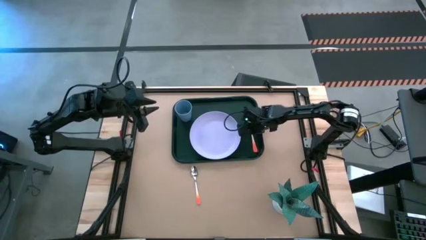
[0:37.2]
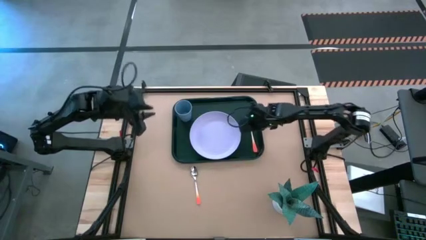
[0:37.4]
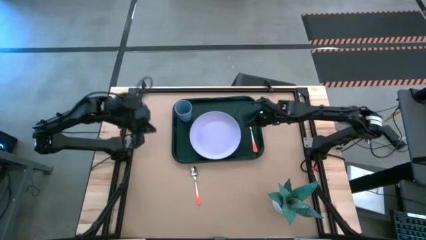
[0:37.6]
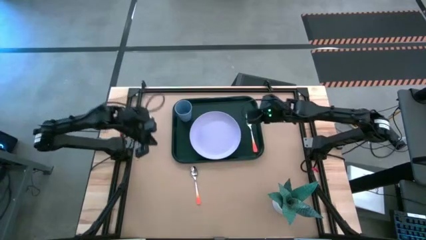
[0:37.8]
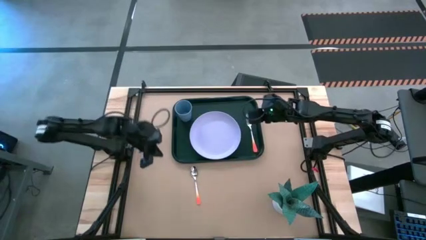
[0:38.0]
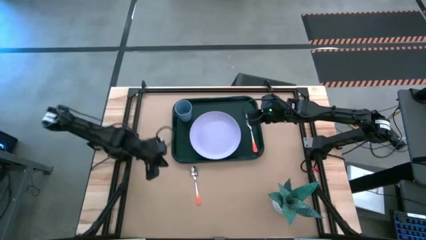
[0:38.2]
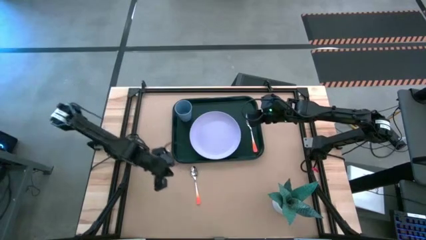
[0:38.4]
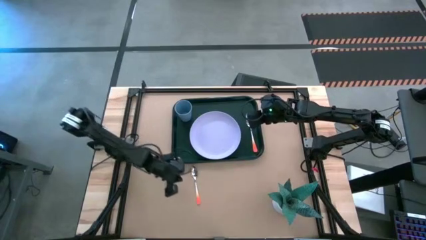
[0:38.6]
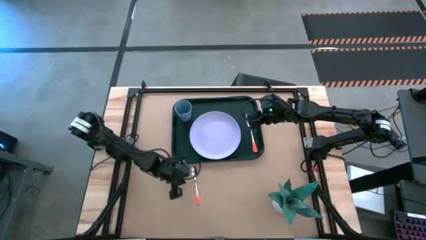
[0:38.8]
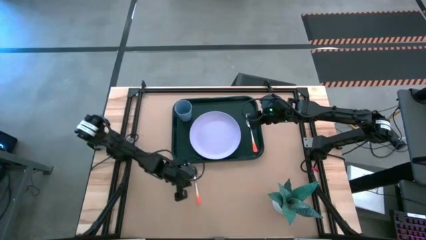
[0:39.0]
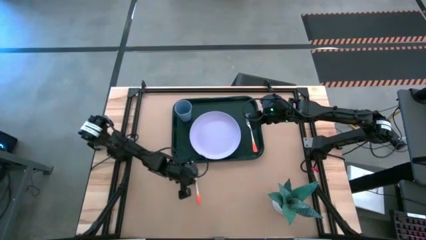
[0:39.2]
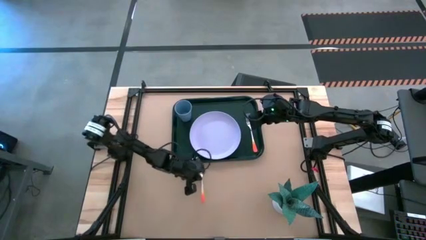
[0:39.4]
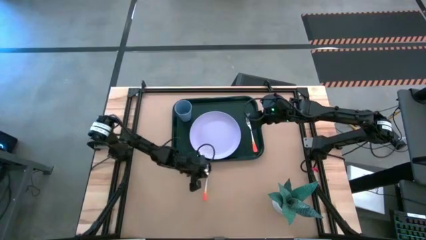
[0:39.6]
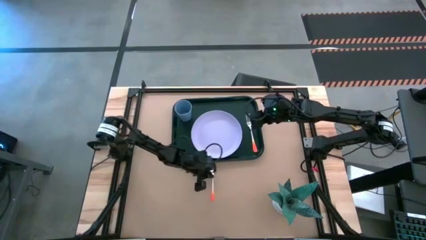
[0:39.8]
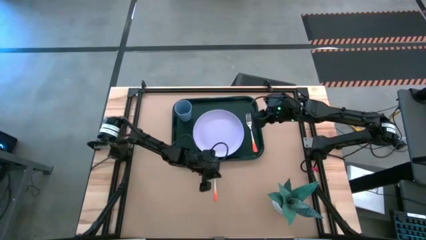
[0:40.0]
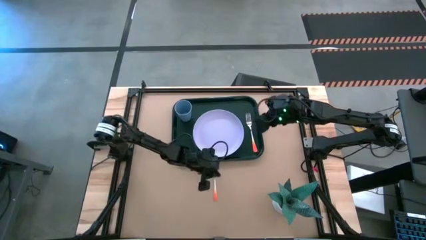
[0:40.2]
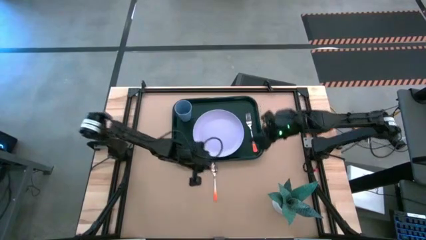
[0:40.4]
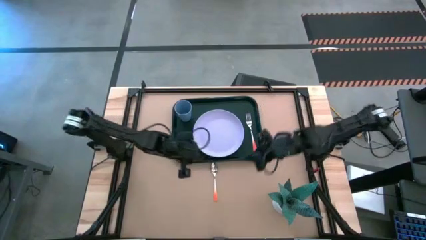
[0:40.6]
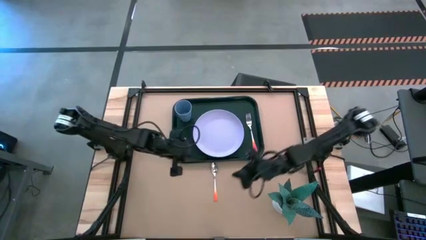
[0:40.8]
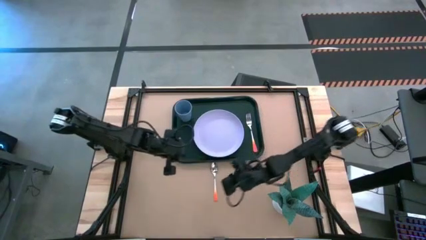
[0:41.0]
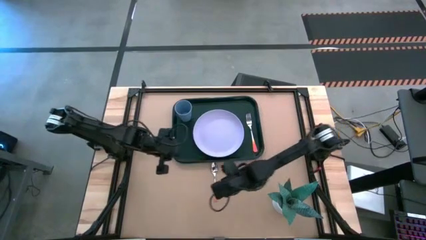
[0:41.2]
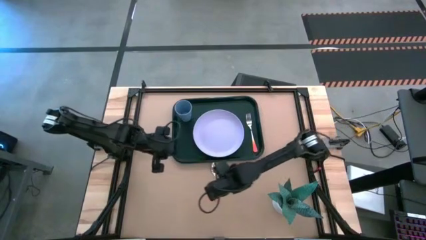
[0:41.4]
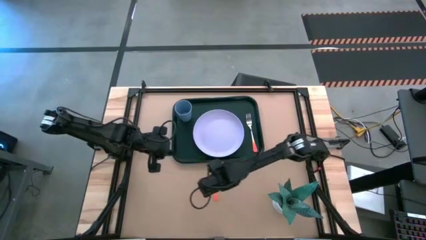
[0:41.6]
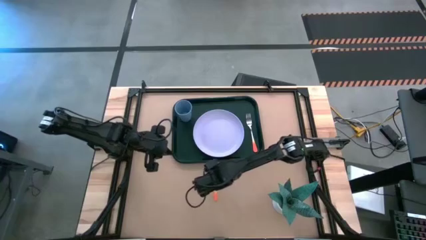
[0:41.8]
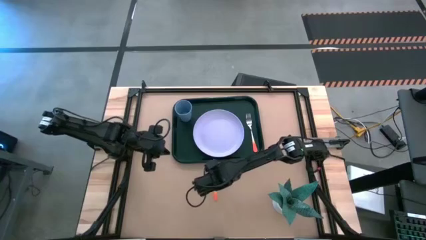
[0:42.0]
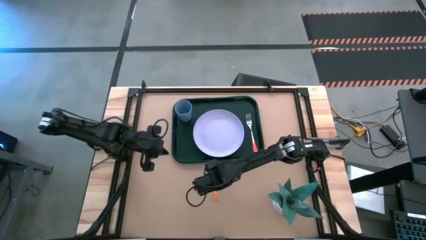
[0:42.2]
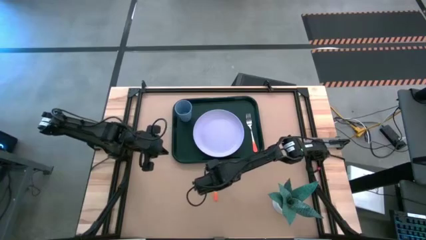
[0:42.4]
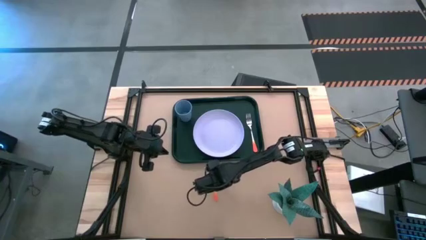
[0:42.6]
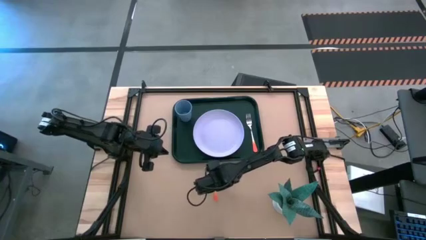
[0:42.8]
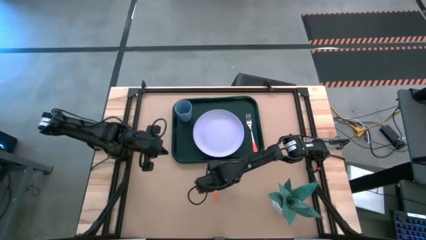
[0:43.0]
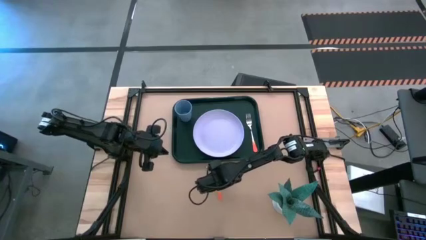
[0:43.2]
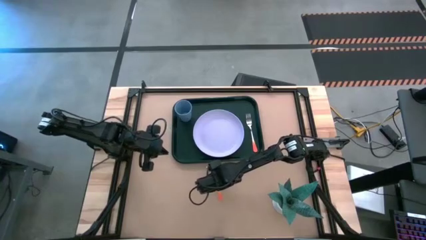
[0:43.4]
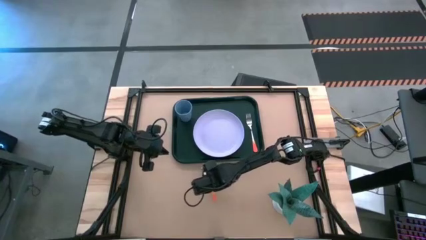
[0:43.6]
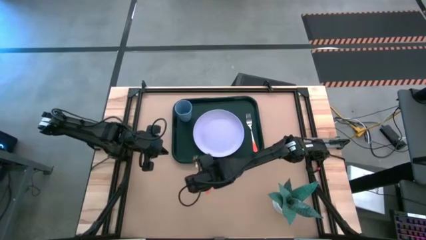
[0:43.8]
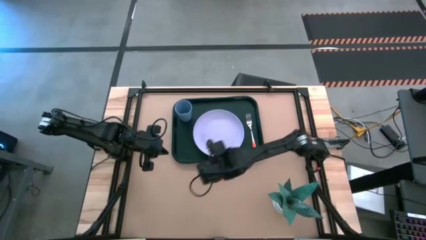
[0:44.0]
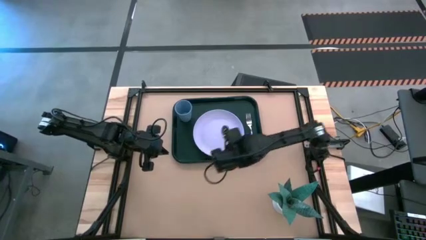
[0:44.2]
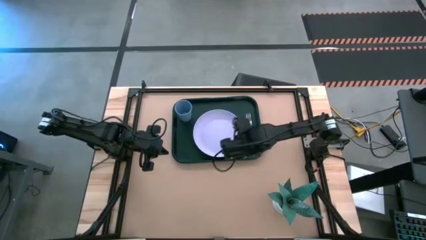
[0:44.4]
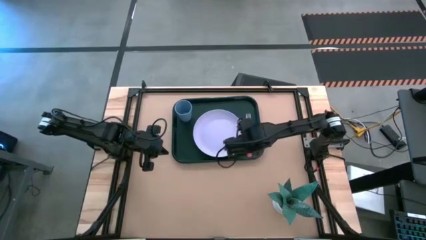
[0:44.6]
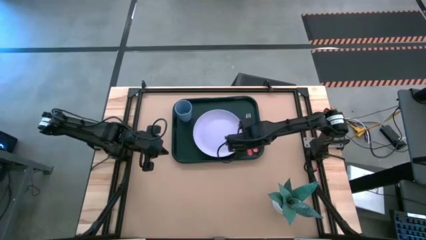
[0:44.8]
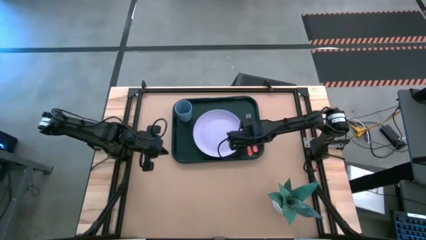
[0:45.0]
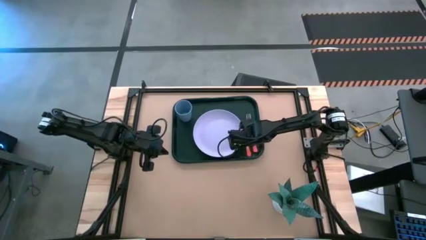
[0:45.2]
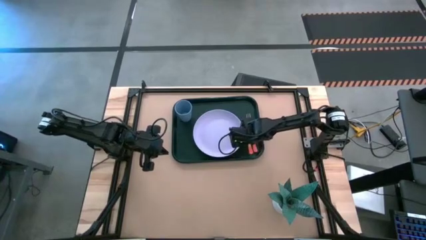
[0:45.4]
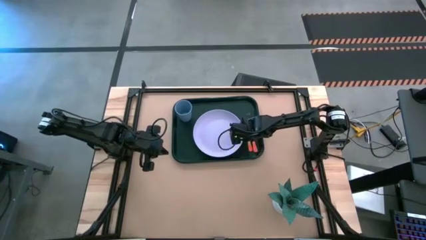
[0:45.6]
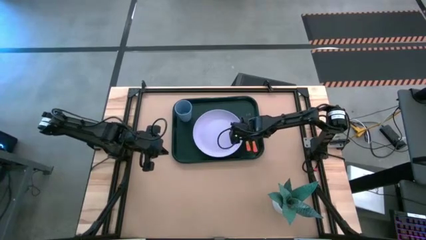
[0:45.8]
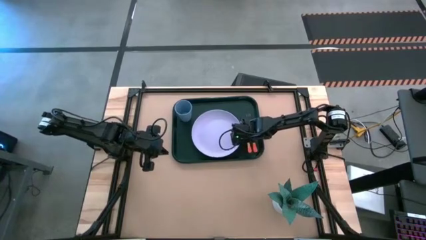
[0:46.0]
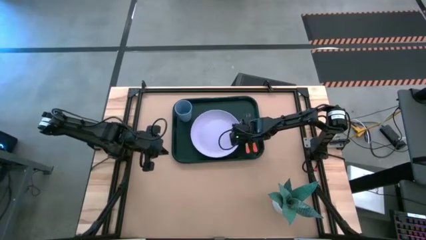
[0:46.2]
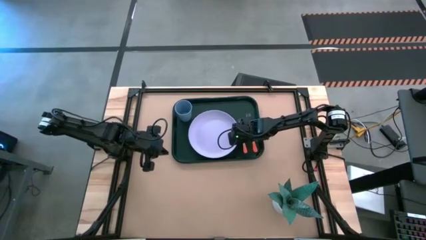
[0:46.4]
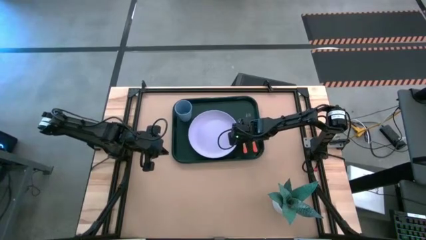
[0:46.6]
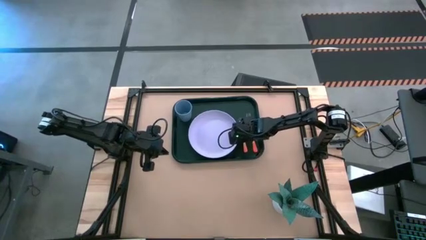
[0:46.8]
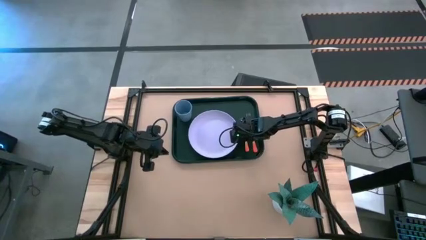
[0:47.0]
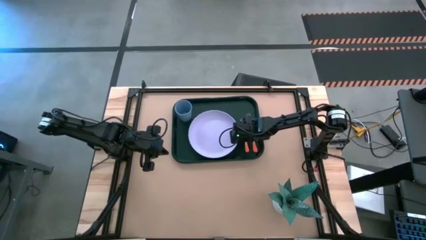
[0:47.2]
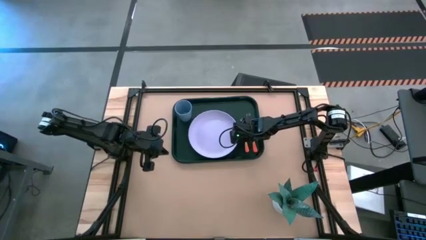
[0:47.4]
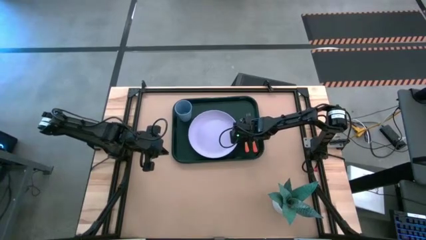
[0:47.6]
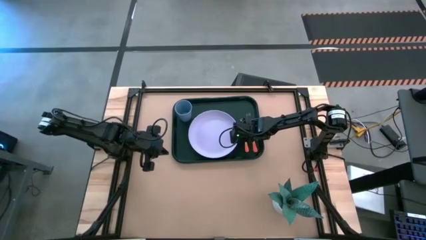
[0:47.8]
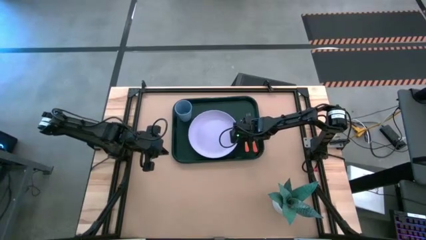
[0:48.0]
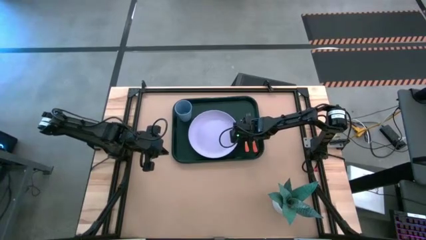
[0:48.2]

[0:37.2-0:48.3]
Task: Pick and place plate/cup/fork/spoon on tray
Put the orange spoon on the black serving tray to the right of the white plate

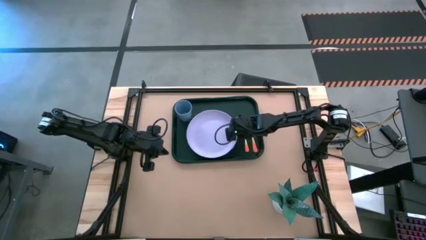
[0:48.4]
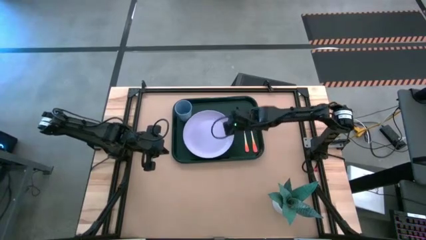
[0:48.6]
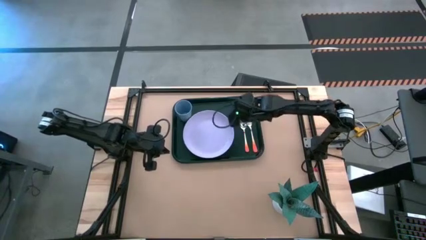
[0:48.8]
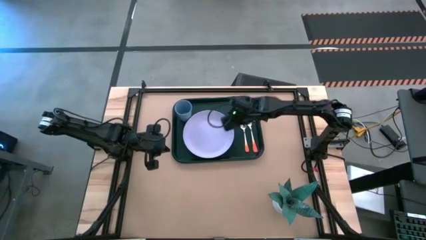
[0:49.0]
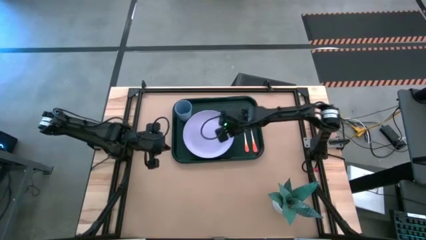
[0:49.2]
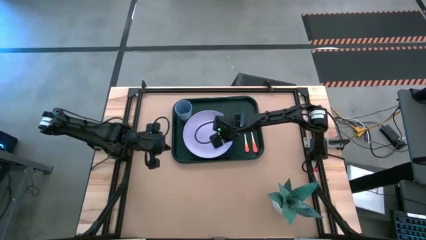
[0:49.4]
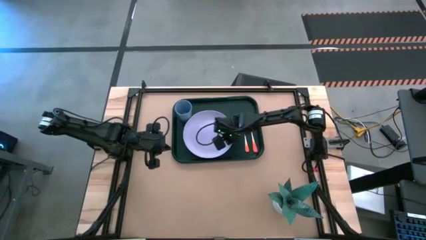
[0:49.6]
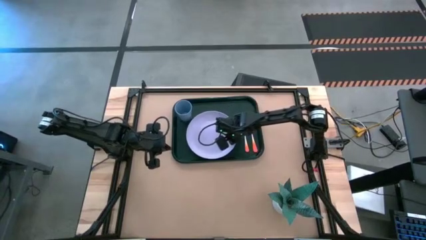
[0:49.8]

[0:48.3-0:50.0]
Adjust the white plate on the black serving tray
